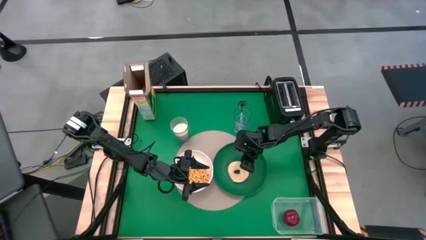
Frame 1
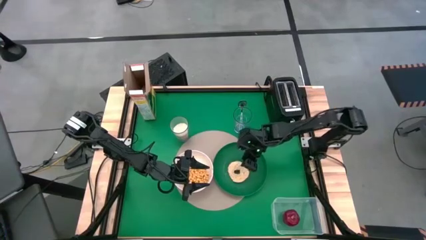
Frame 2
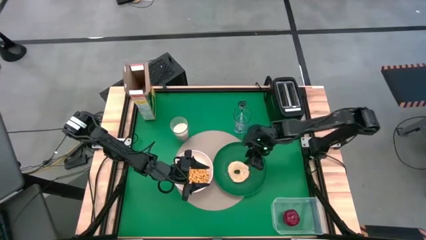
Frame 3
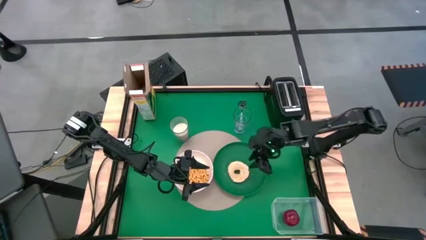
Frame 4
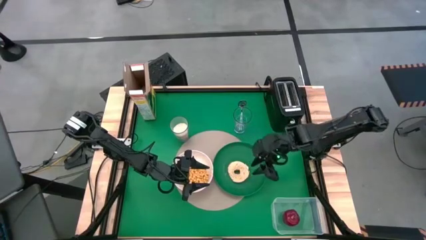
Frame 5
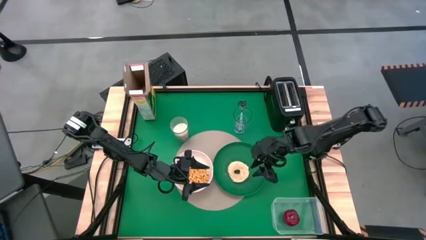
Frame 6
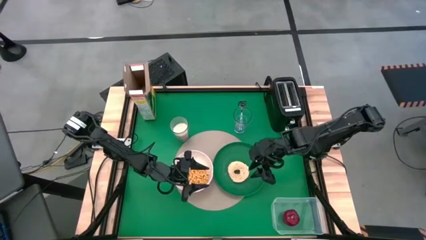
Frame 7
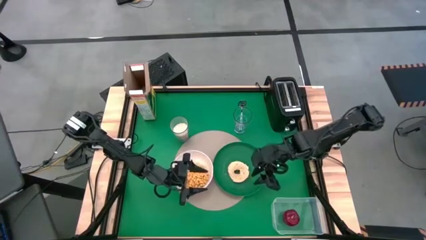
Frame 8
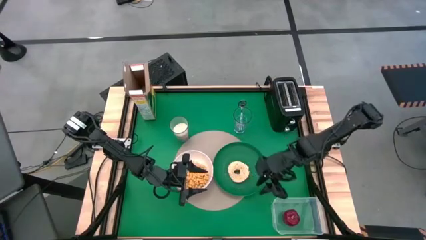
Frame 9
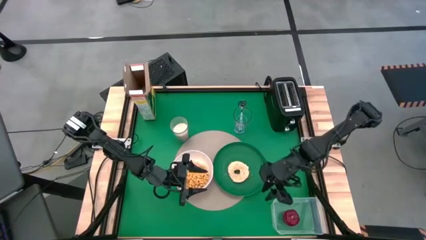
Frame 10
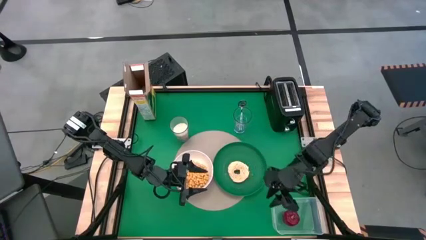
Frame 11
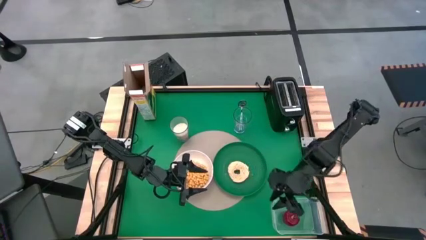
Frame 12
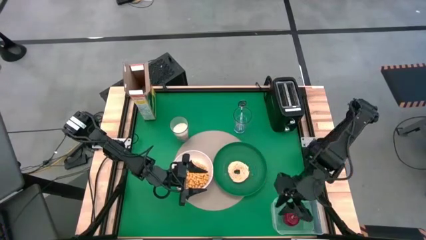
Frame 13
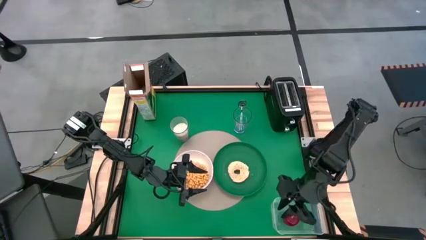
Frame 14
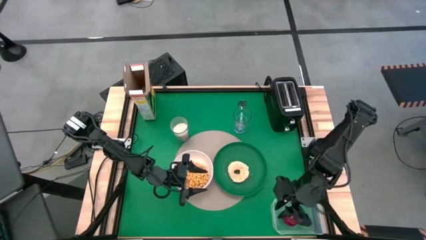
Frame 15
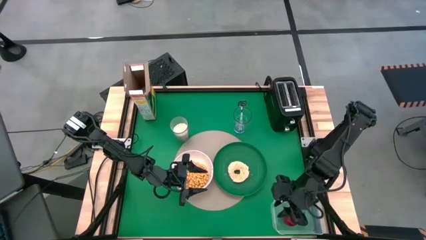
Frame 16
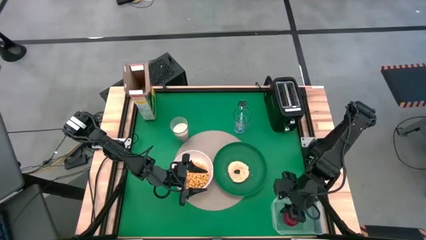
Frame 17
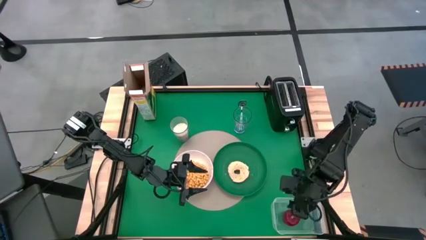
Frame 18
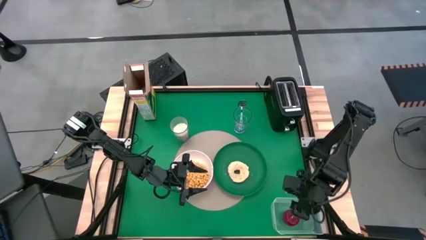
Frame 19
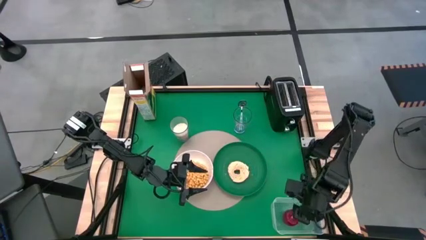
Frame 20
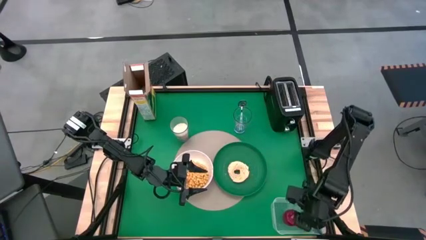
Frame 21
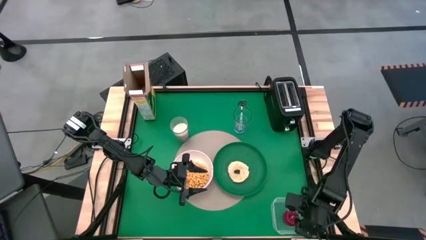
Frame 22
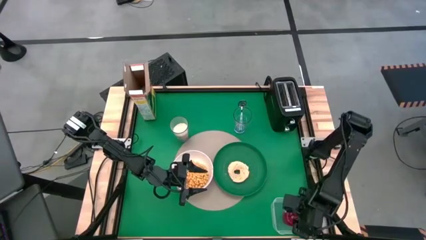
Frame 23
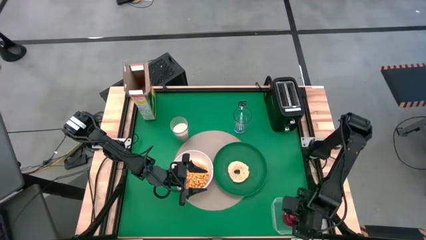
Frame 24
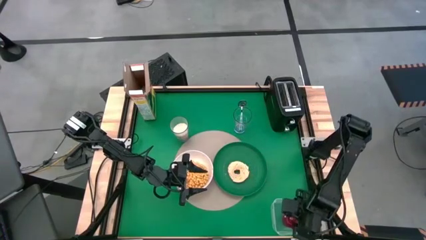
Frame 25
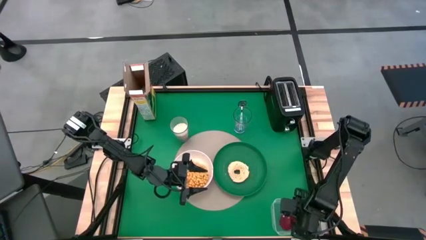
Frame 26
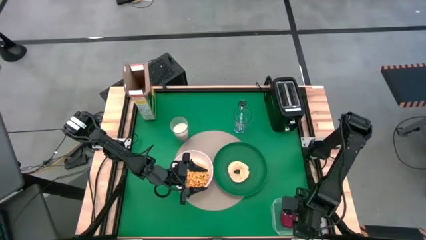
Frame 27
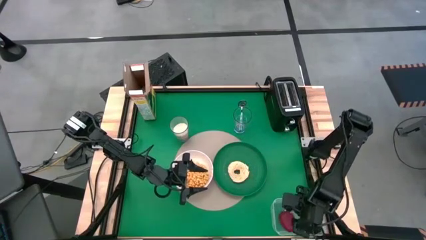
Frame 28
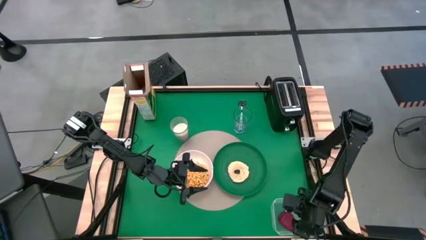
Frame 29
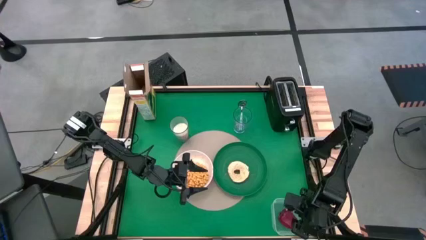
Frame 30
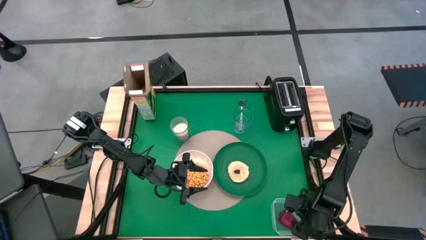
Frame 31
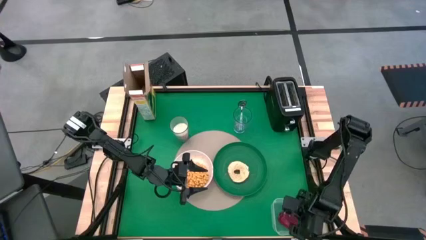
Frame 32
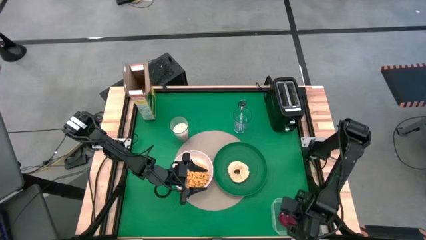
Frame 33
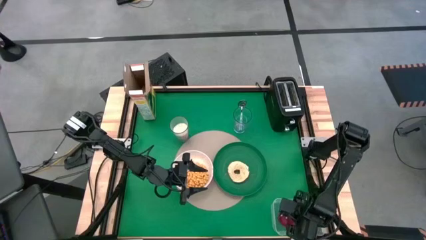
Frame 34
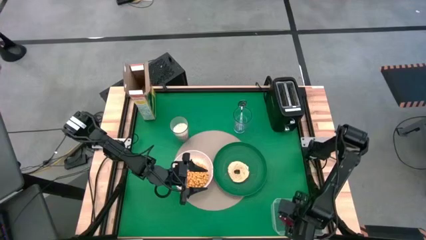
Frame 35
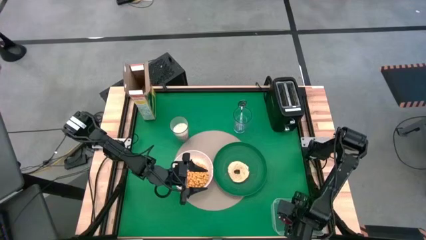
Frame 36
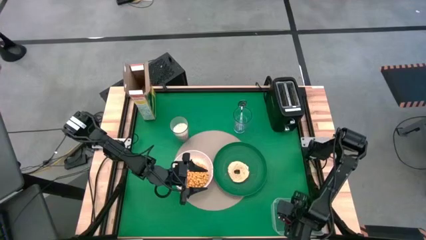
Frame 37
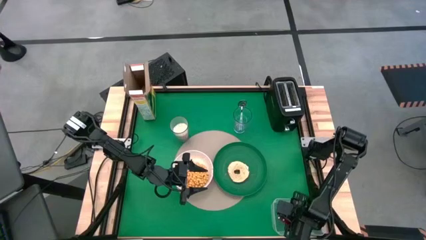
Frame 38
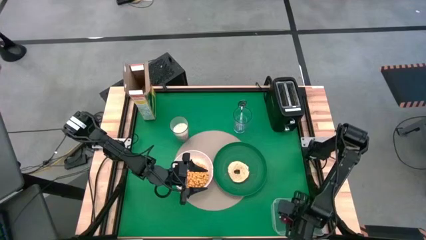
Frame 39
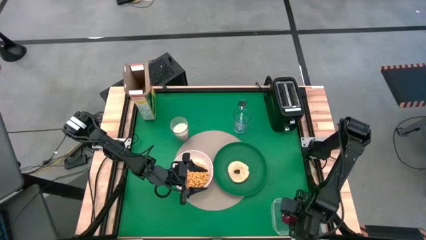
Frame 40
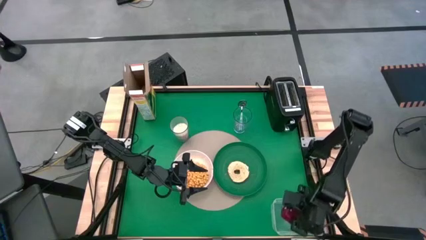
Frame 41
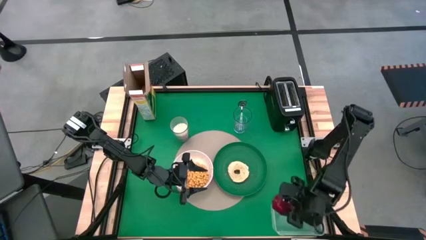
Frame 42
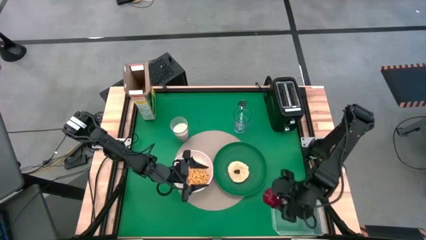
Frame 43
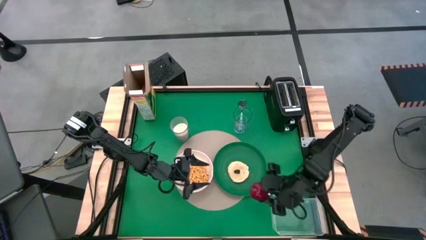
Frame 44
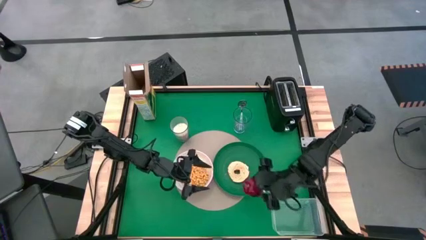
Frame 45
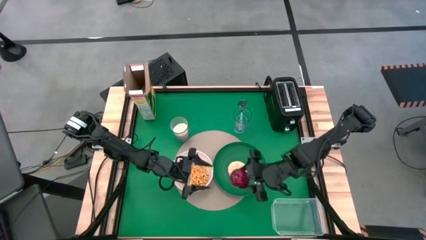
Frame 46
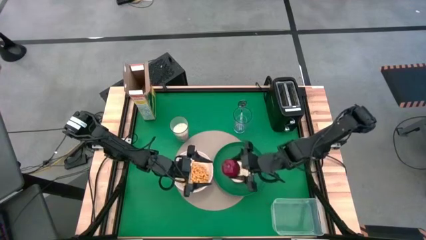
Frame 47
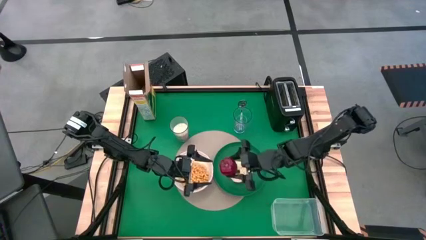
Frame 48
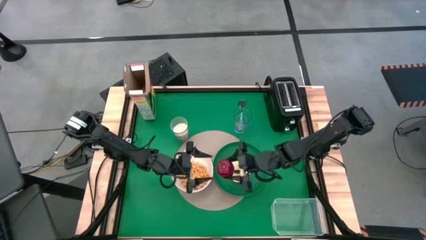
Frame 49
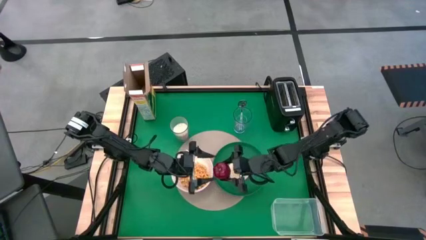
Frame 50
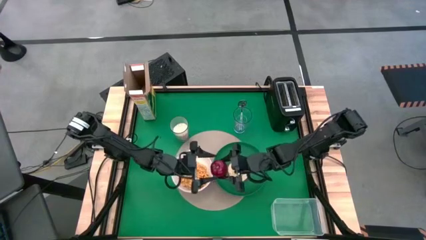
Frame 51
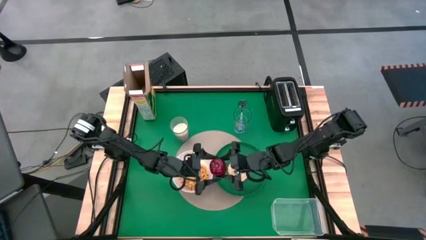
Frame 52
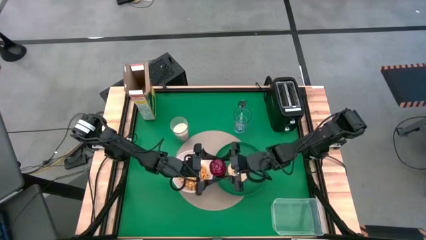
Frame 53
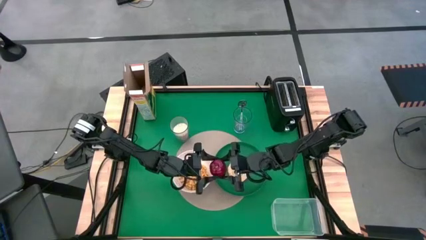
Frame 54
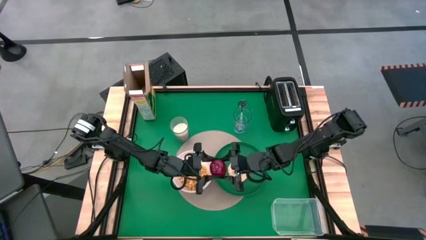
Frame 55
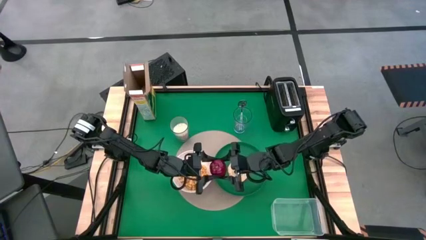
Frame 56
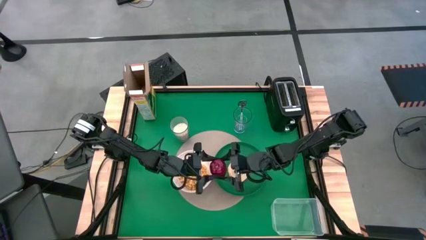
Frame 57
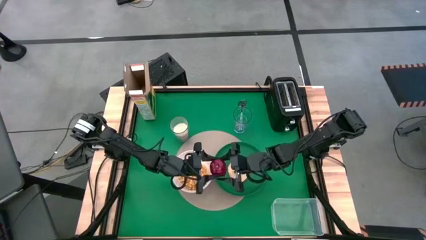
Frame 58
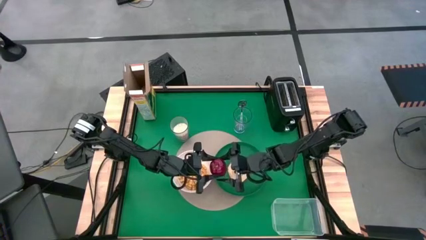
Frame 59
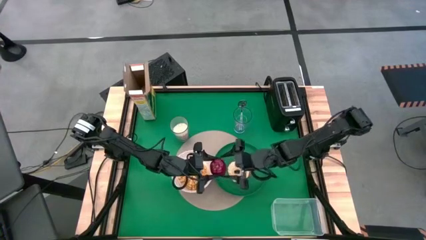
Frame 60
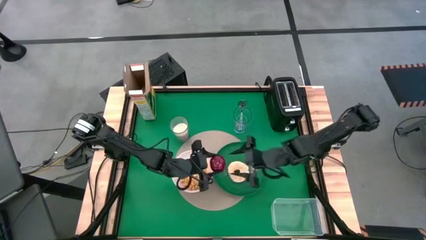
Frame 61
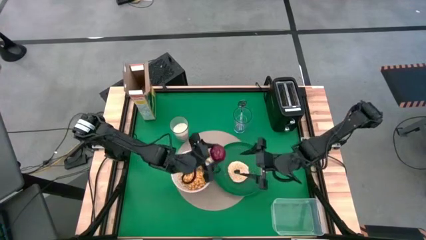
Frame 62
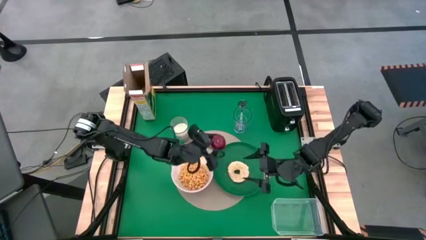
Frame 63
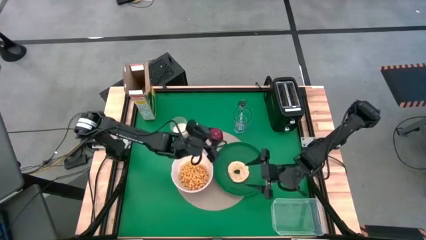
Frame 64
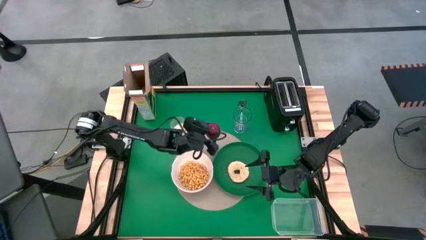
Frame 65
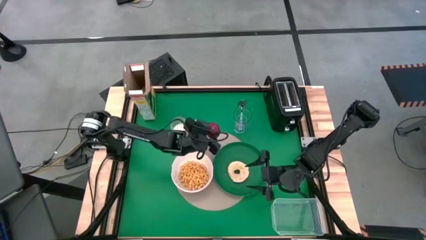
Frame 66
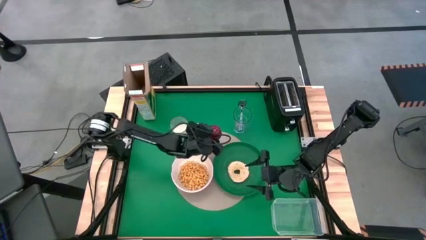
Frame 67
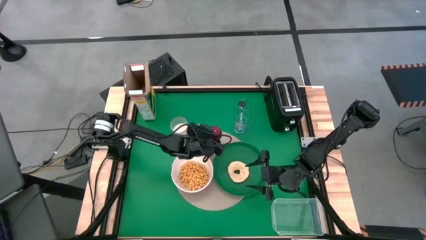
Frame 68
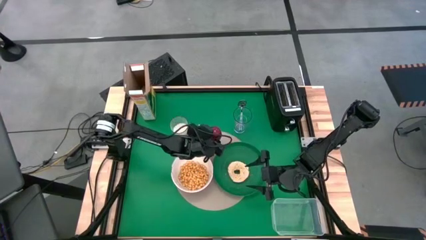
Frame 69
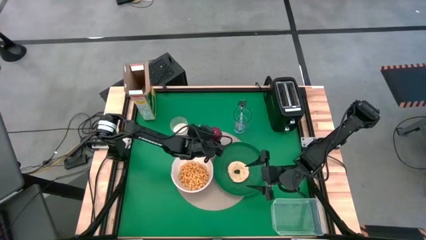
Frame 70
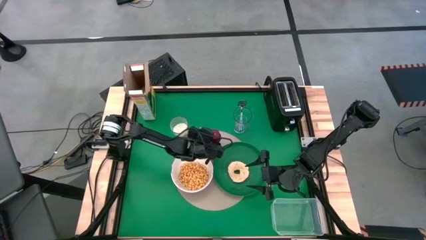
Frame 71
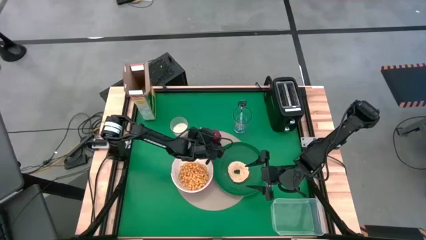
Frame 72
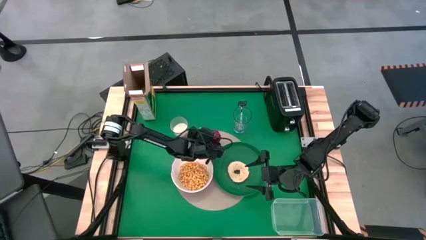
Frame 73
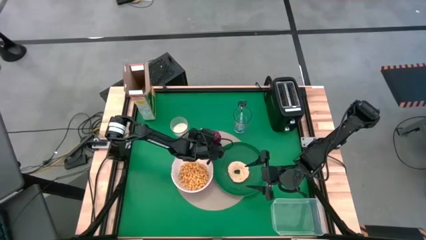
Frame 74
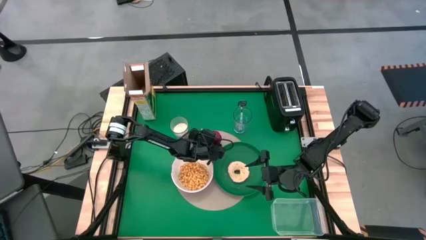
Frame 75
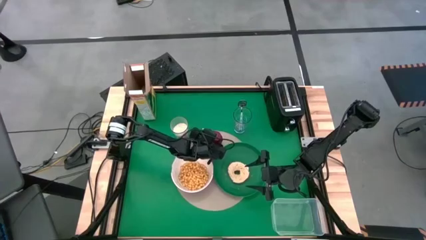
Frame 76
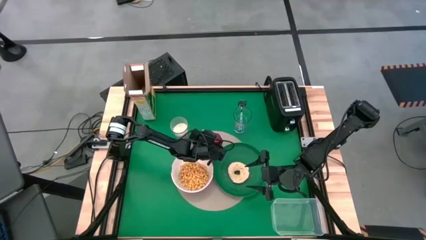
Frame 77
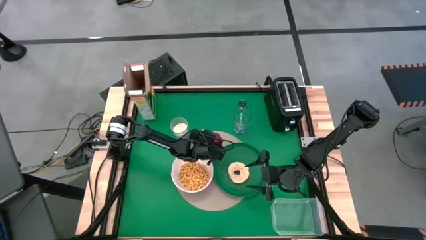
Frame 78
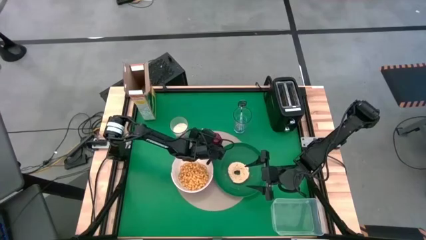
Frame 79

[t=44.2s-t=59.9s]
Task: Arrange a breakfast setting
Put the red apple on top of the brown tablemat
